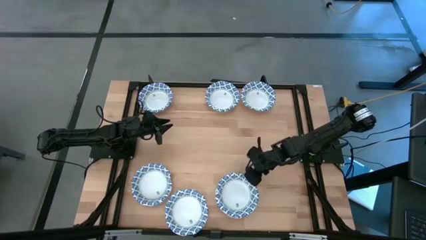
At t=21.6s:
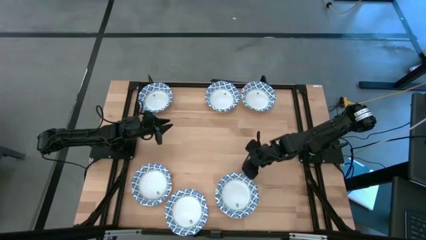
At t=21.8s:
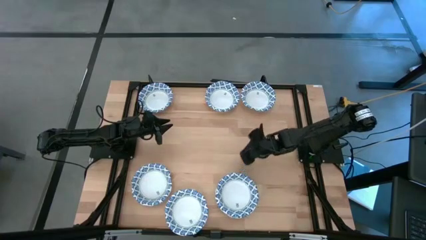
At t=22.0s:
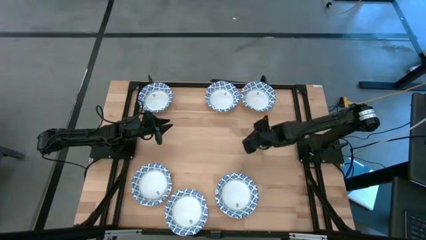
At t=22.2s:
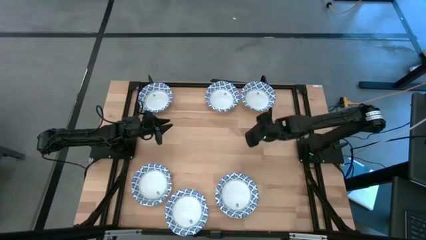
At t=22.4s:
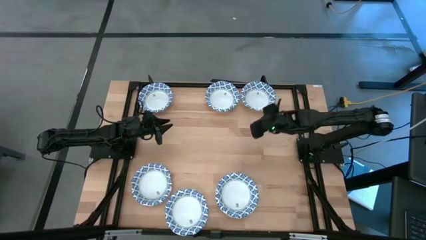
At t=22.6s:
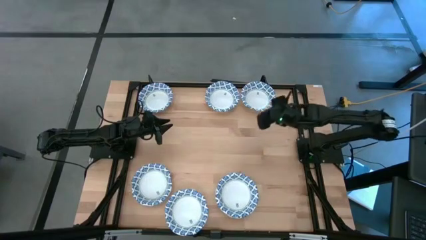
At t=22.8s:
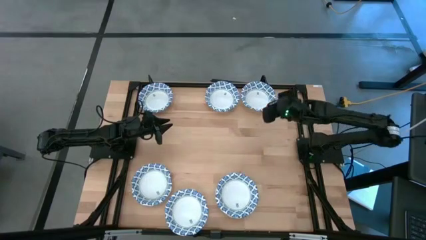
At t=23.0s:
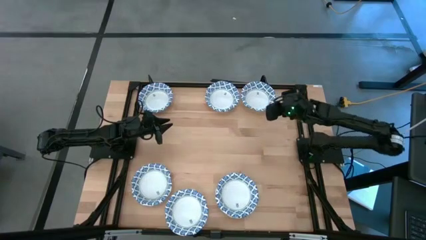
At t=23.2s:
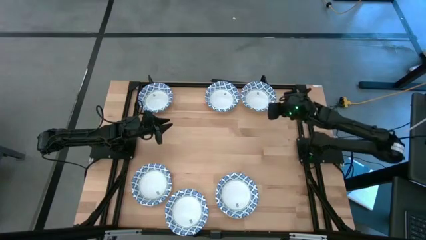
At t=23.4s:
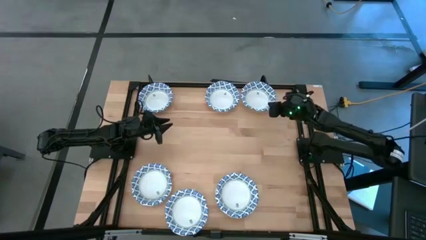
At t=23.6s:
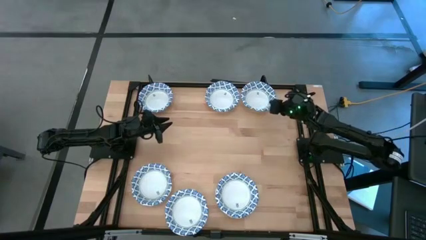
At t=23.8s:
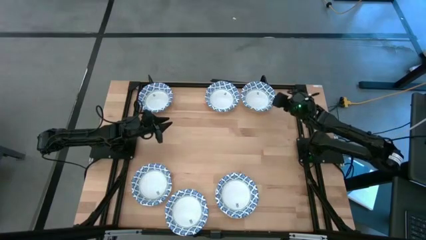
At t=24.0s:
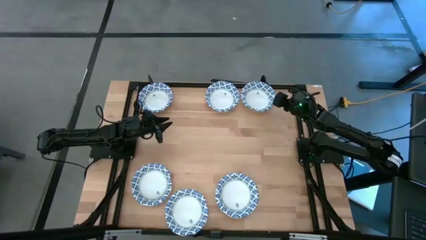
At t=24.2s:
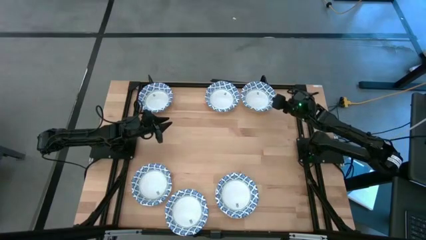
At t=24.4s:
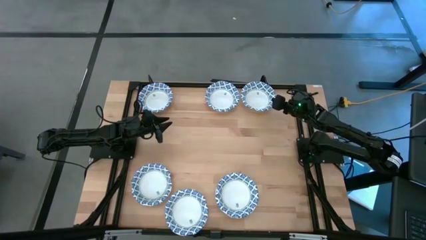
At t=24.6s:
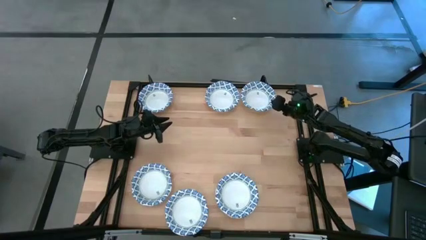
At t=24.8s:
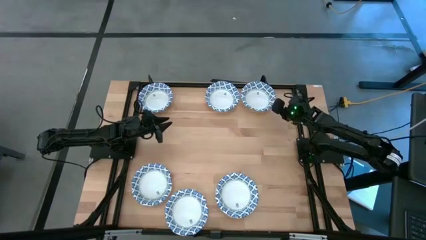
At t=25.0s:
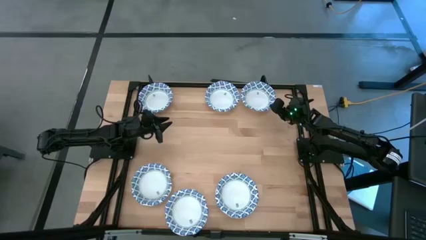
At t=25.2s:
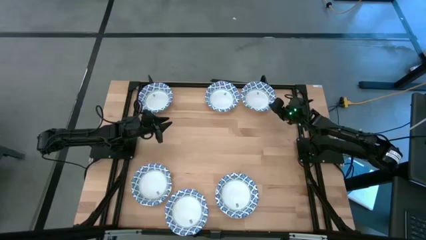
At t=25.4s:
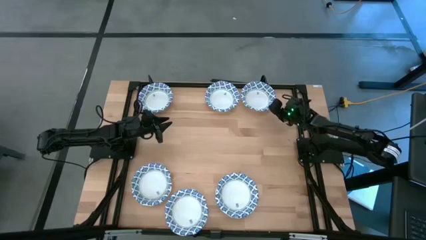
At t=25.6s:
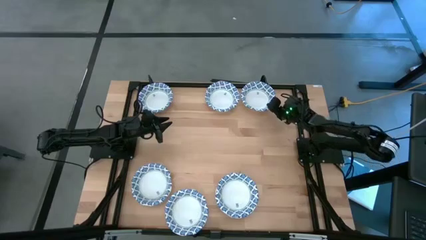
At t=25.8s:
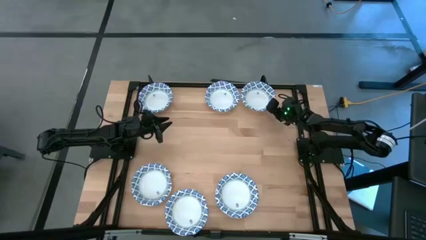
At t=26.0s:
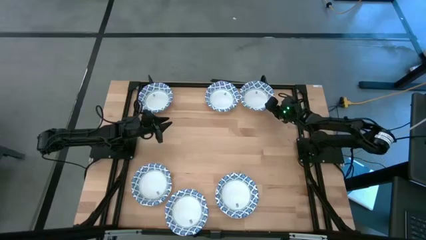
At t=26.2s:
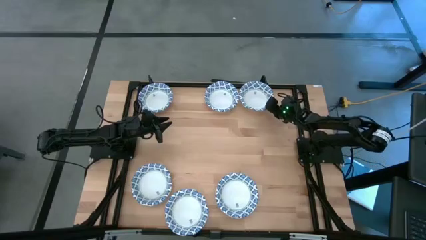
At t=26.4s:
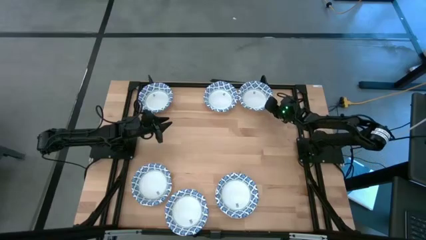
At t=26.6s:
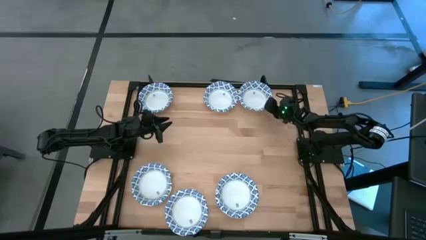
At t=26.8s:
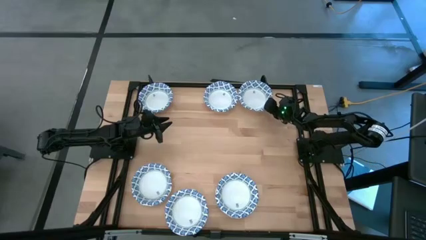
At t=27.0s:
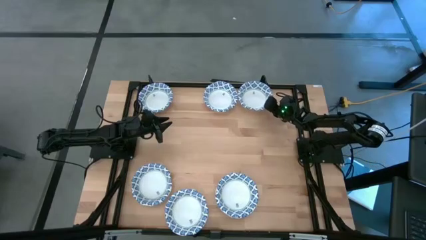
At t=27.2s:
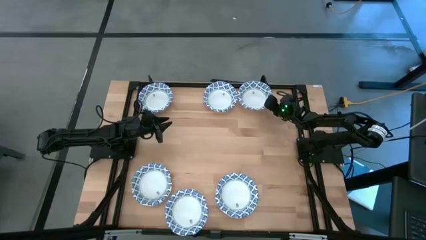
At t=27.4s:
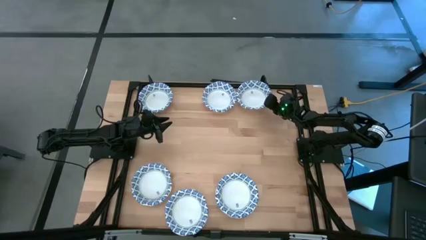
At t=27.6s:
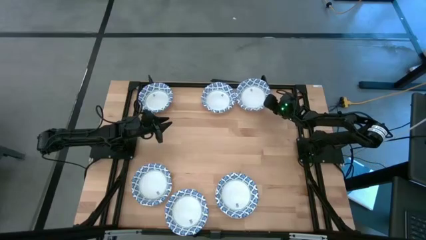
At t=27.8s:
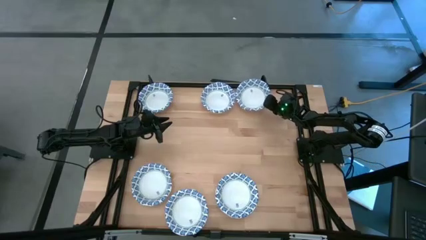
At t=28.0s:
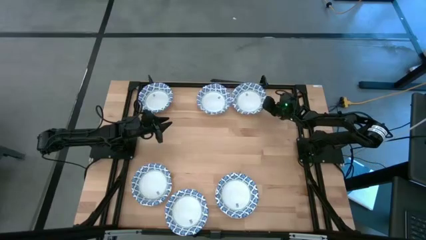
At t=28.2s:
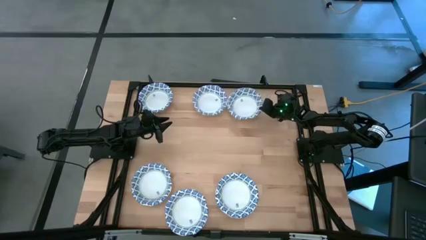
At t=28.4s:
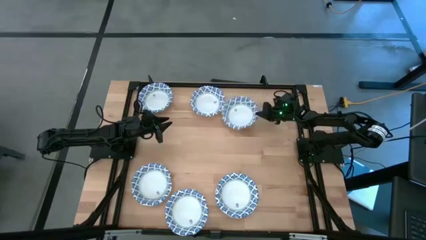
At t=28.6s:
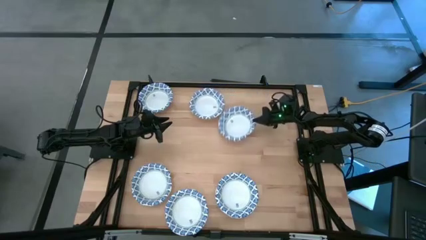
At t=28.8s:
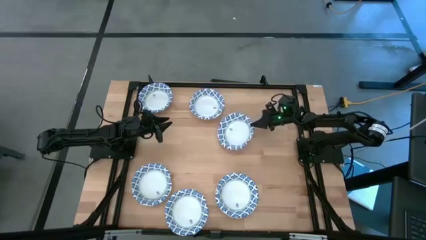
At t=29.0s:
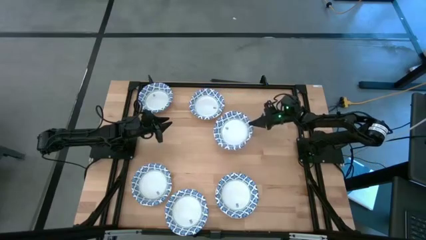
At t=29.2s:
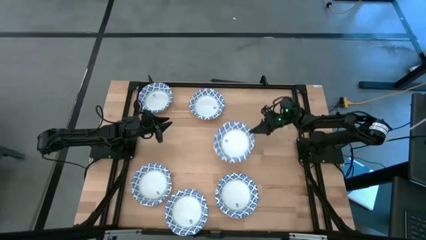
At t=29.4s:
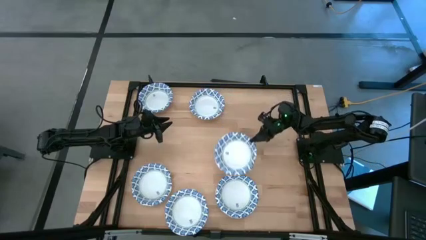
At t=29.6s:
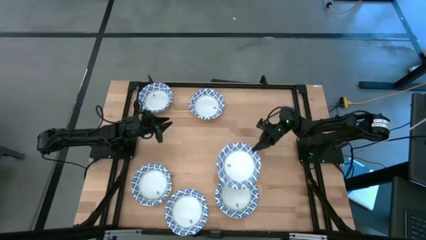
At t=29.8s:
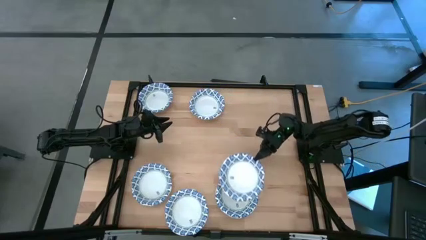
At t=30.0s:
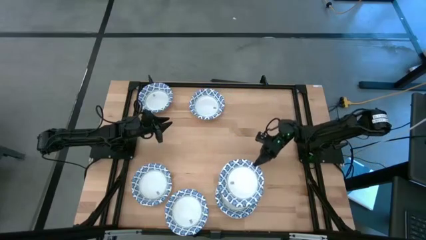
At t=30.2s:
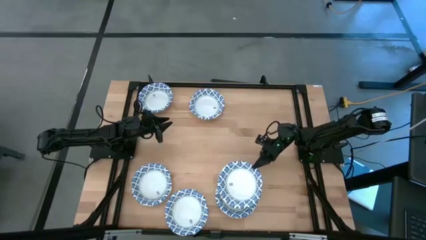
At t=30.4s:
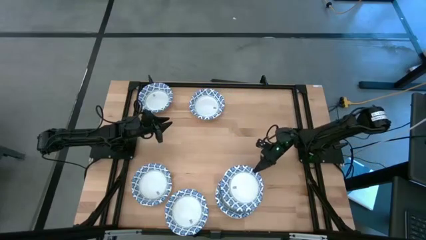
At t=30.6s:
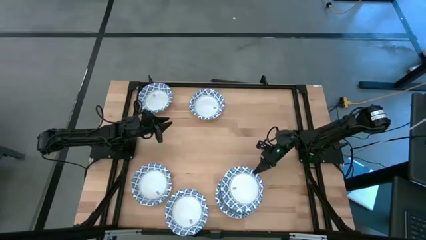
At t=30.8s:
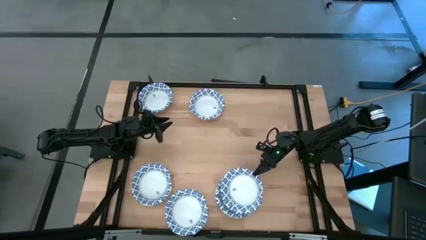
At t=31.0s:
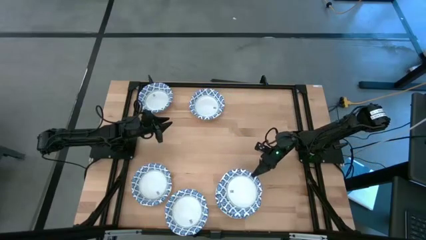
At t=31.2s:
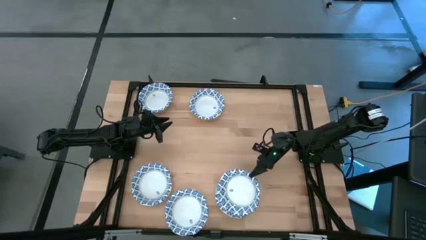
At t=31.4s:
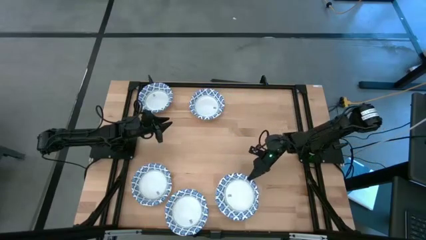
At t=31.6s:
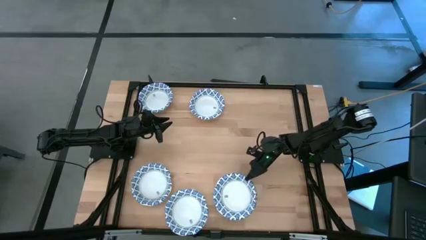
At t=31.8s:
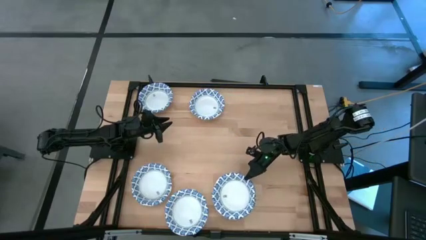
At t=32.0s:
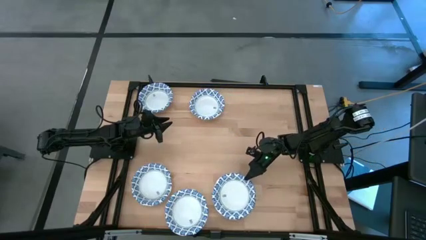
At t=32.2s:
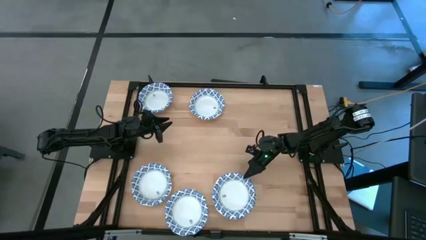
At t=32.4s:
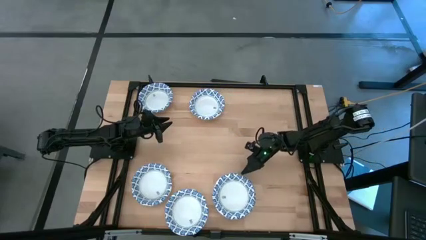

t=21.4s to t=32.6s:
Task: Nest bowls inside each other
Stack the blue patterned bowl on the blue patterned bowls

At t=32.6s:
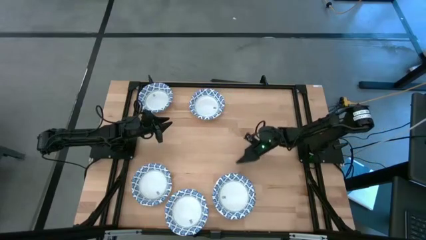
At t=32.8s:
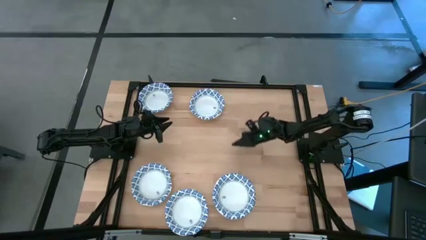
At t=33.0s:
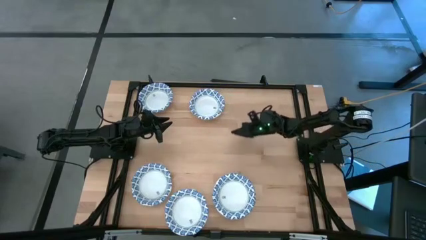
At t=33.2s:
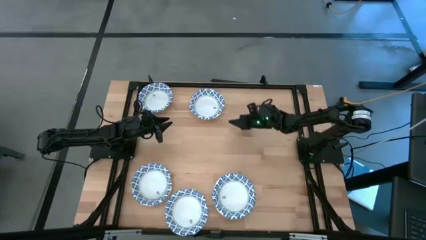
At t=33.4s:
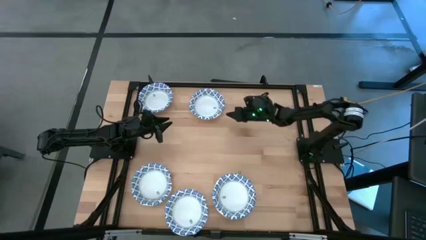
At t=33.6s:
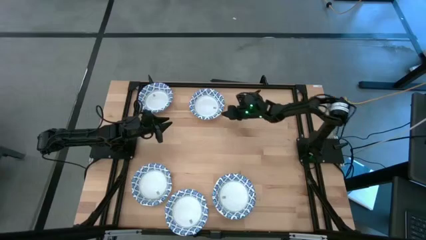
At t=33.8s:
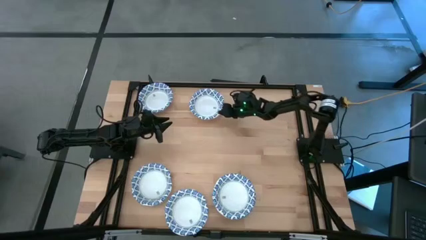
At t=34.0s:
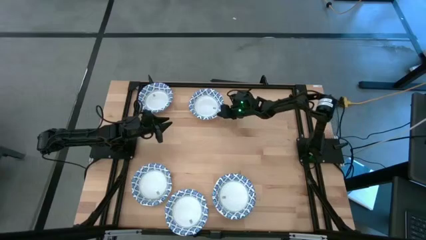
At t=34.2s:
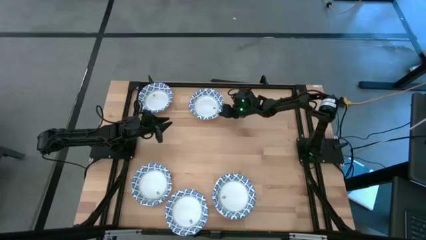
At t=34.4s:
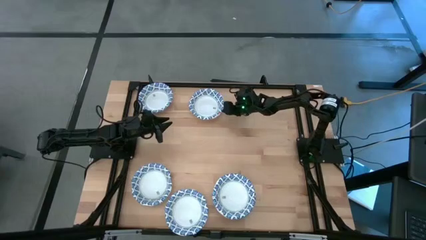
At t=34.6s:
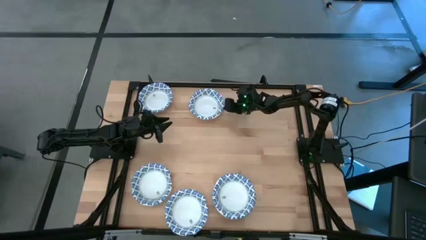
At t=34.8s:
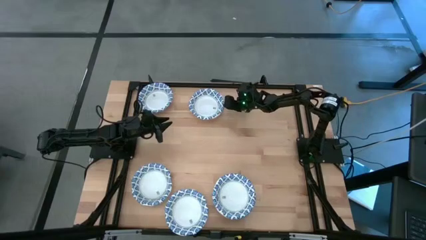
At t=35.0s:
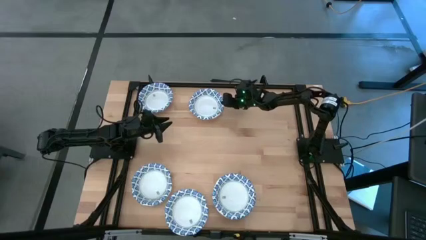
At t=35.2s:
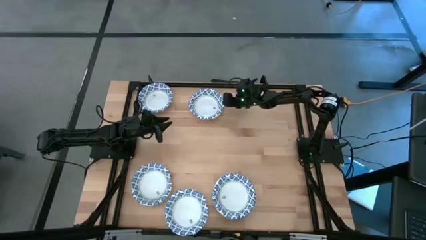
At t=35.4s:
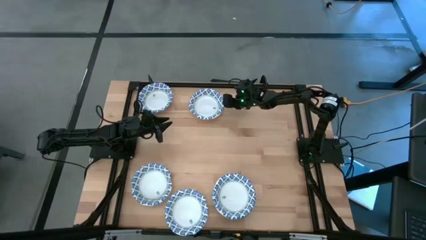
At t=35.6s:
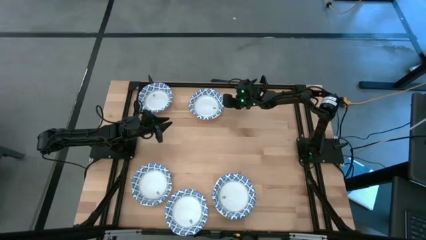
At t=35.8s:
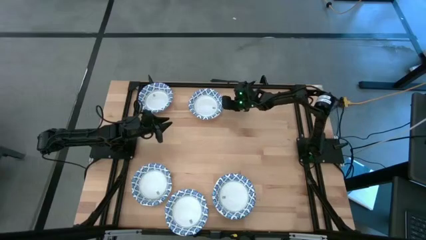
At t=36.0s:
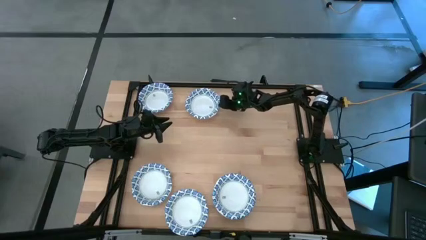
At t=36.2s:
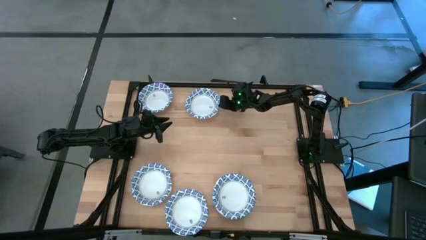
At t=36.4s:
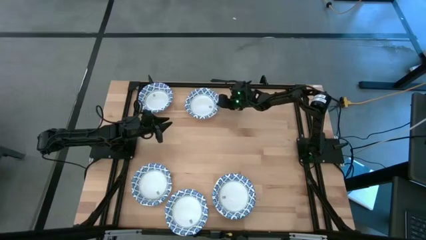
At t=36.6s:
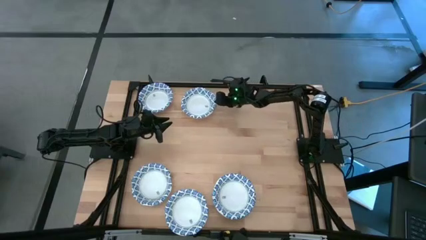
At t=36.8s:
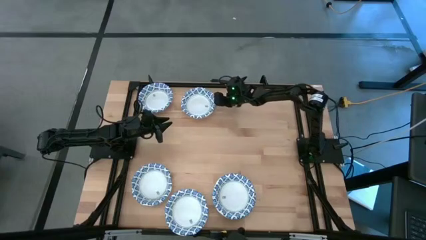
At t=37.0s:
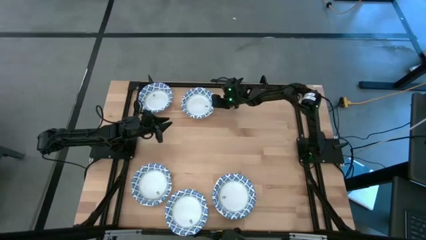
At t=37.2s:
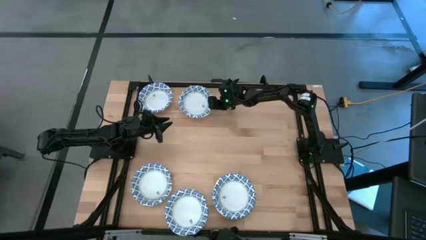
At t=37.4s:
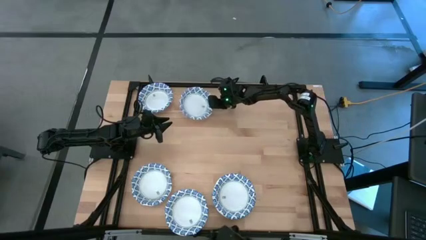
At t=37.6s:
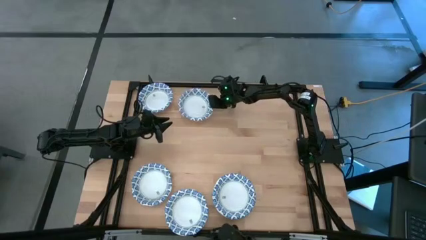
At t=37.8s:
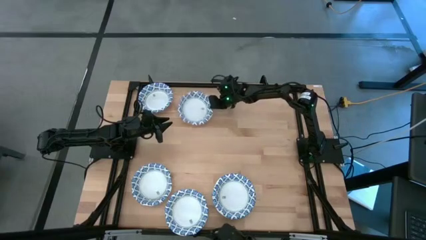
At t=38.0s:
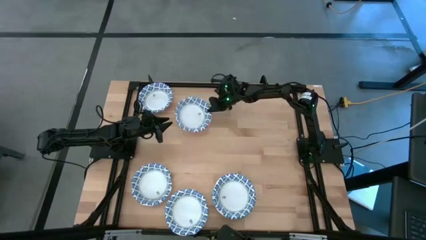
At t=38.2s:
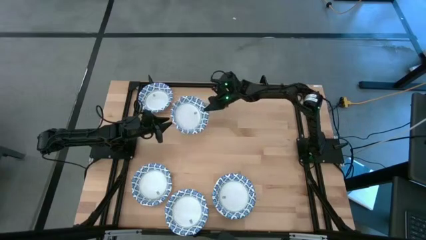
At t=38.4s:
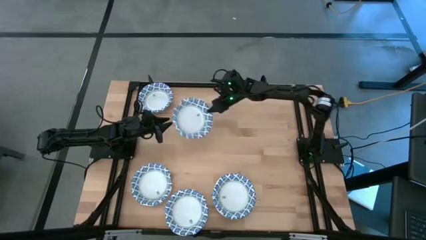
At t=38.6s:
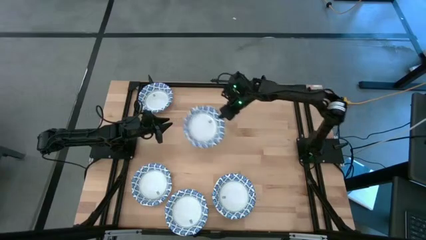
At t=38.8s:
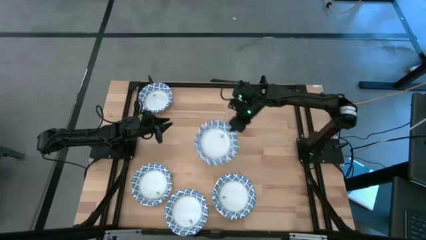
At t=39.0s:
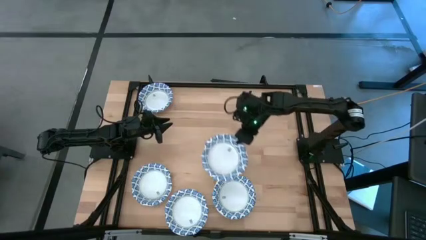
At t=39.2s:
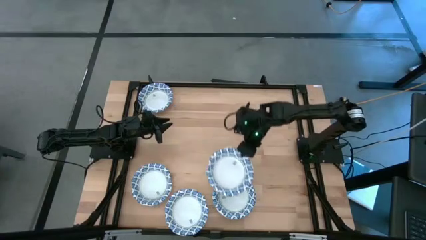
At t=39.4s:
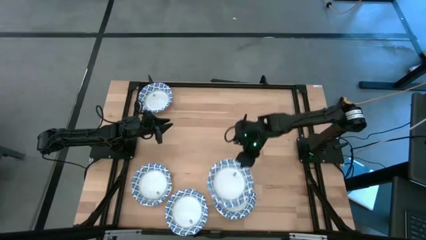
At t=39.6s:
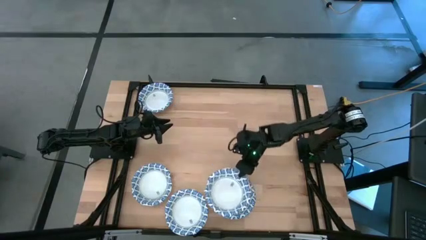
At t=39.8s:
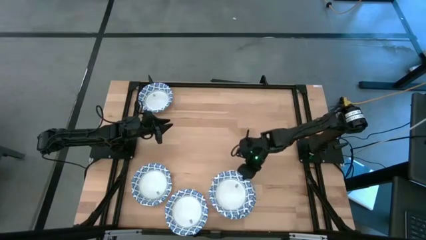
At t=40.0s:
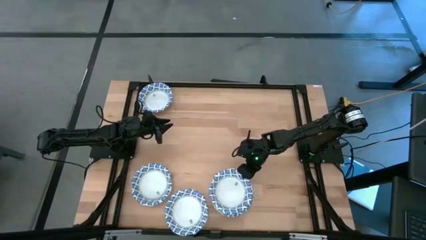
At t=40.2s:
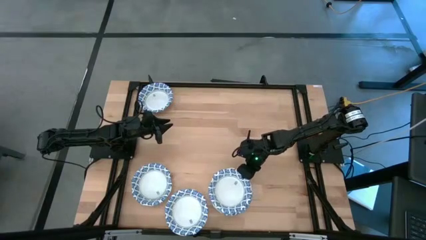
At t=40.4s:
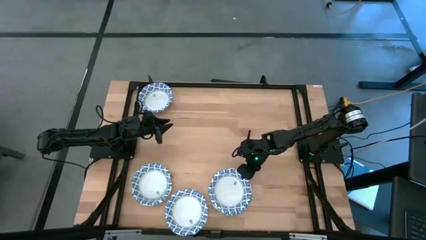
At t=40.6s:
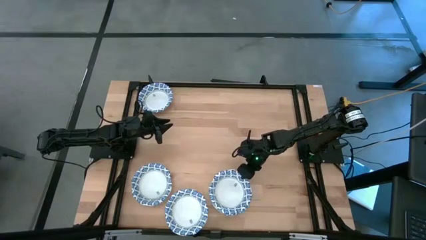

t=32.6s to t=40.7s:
Stack the blue patterned bowl on the blue patterned bowls
